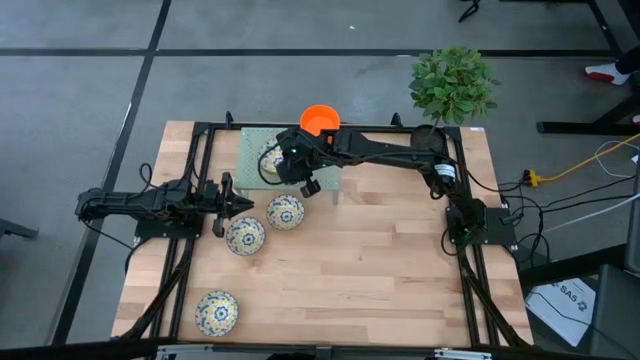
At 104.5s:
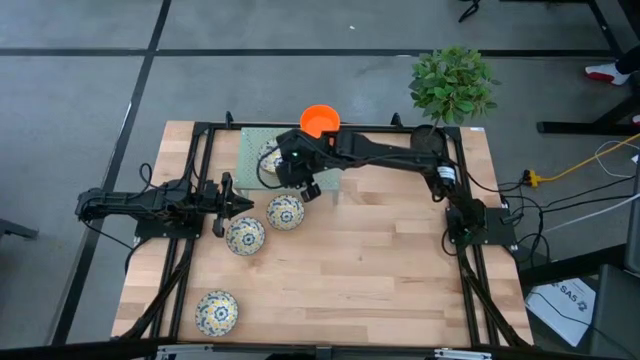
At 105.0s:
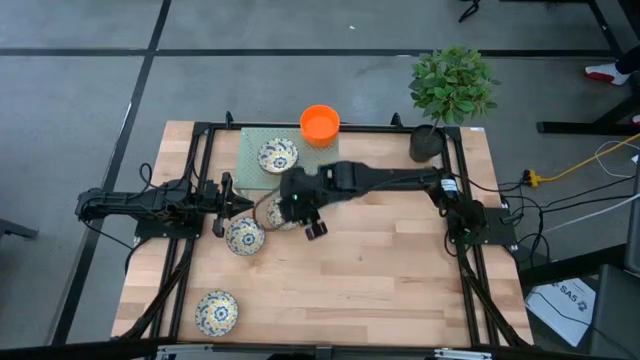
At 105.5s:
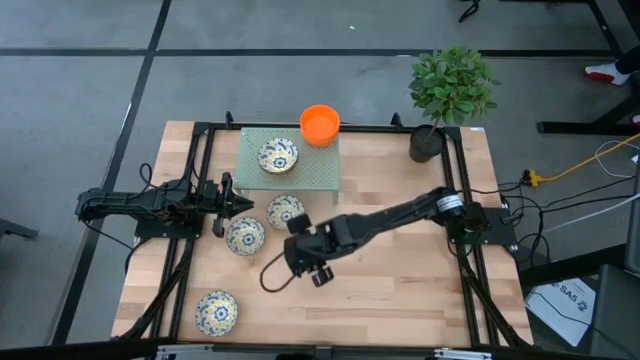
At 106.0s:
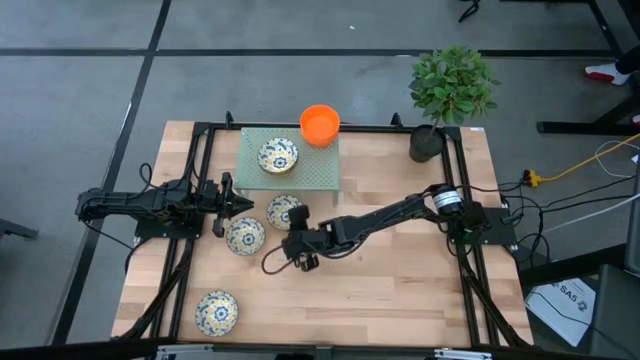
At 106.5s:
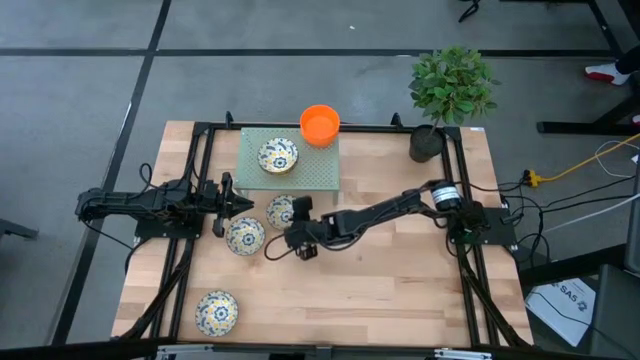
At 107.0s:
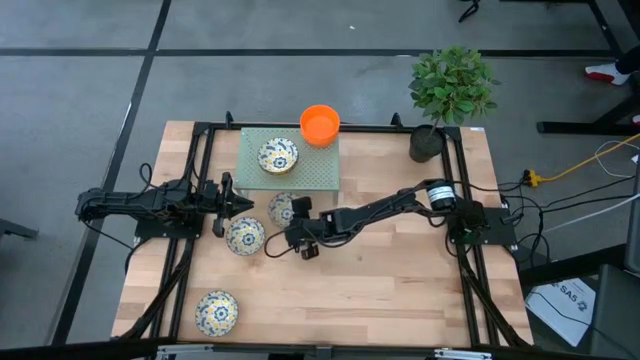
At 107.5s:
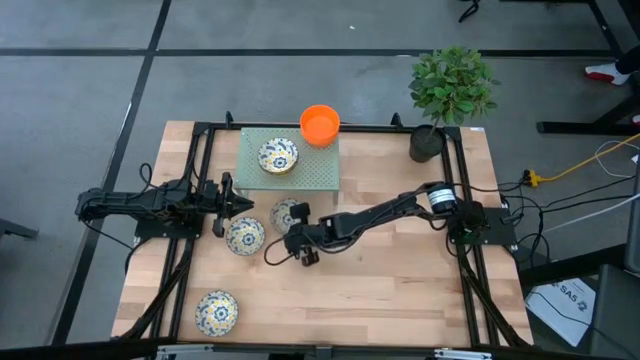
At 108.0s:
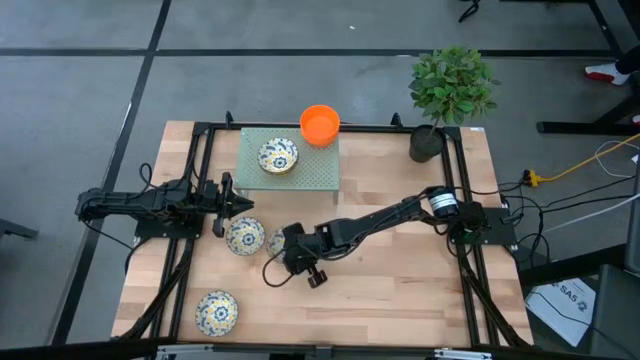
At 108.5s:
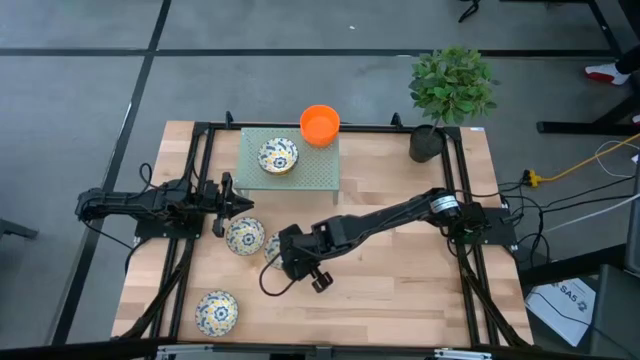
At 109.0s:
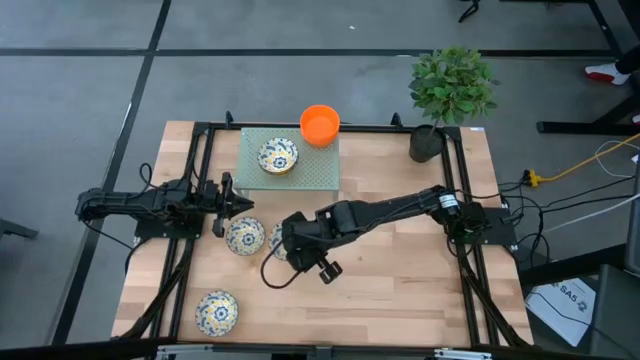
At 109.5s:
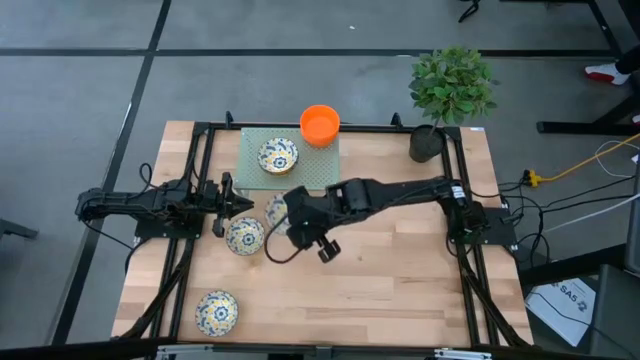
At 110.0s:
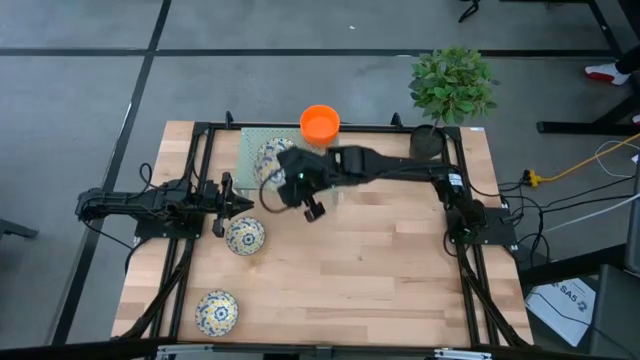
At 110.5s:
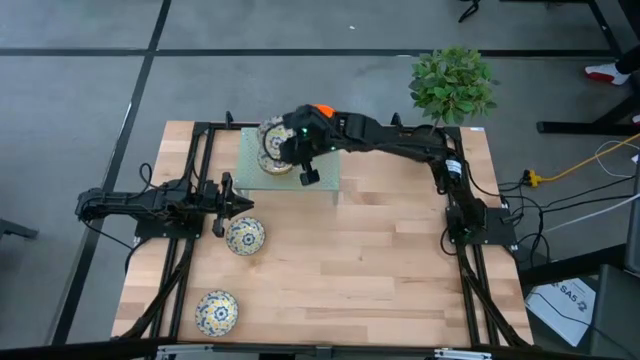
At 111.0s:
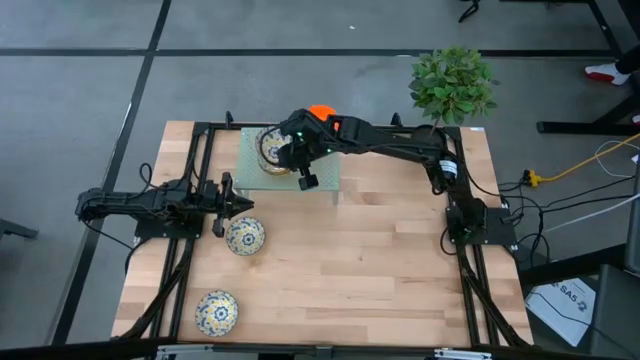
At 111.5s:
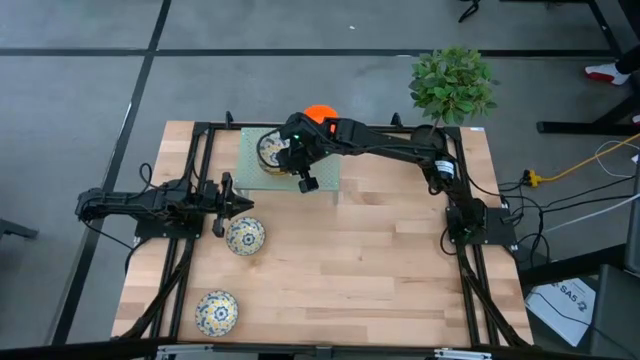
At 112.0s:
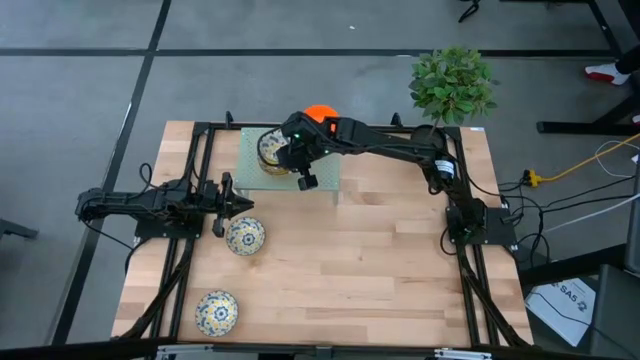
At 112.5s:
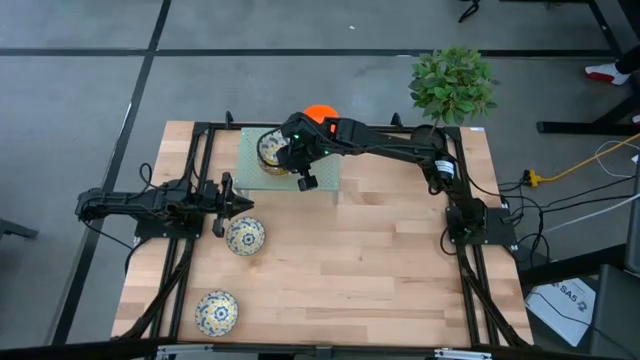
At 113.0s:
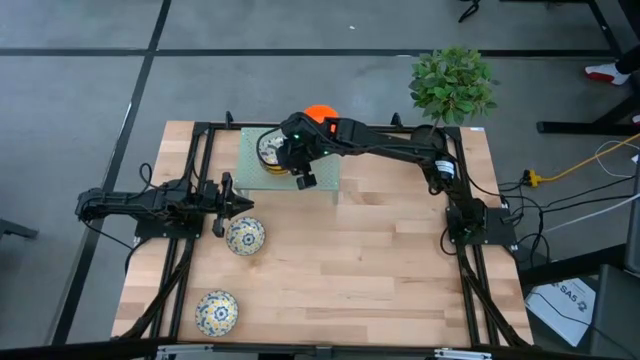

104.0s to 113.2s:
Task: Pick & Place Mini bowls
Stack the yellow bowl on top of the other yellow bowls on the shelf

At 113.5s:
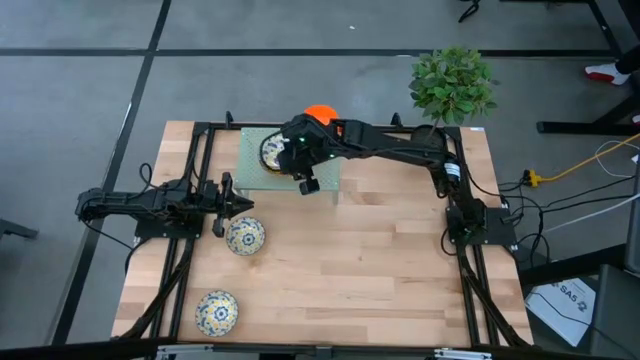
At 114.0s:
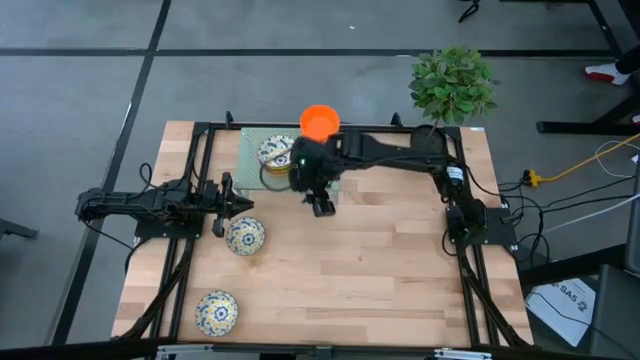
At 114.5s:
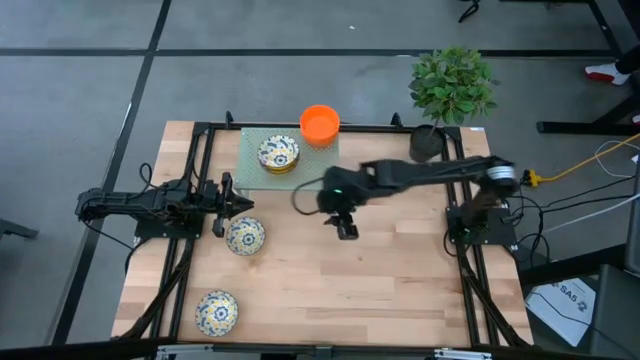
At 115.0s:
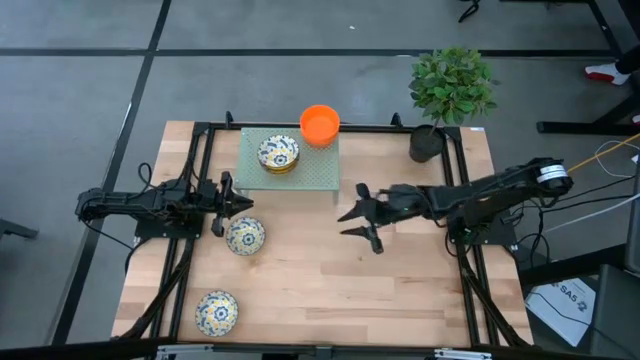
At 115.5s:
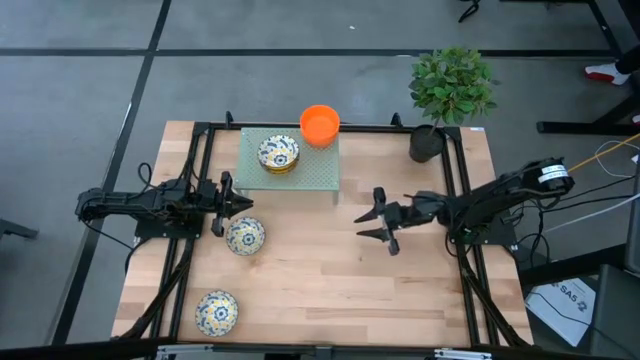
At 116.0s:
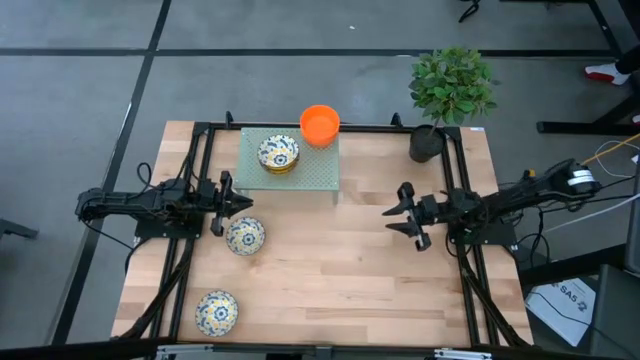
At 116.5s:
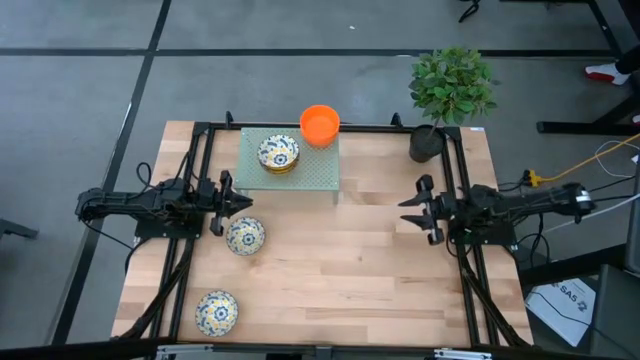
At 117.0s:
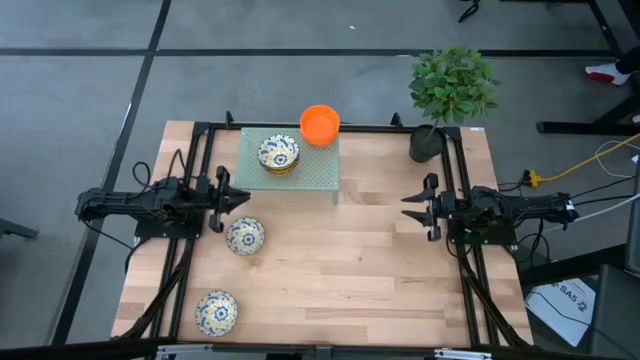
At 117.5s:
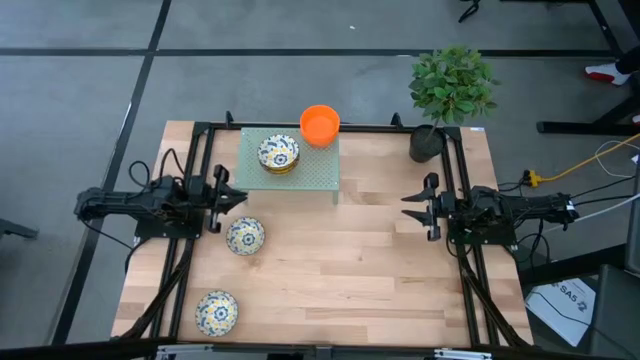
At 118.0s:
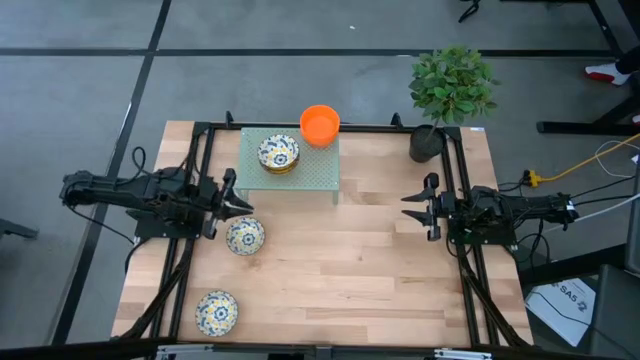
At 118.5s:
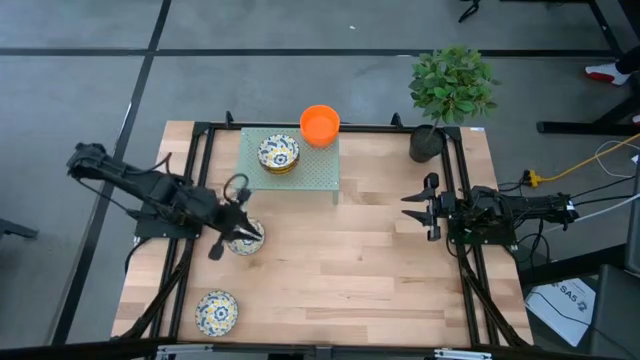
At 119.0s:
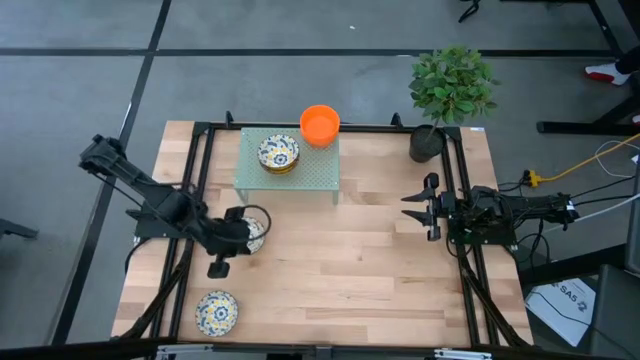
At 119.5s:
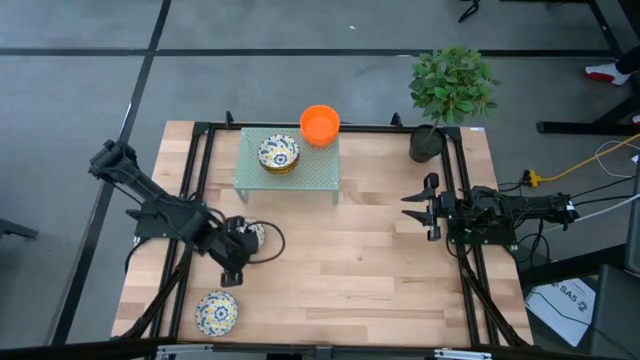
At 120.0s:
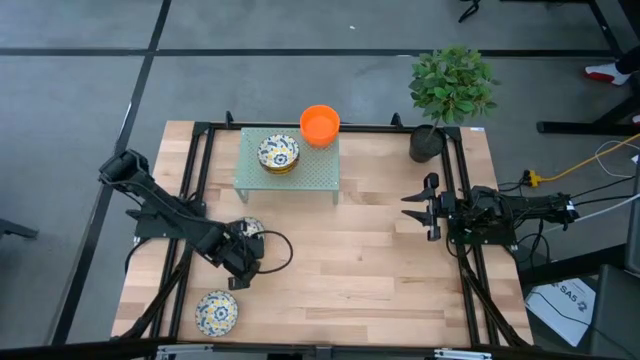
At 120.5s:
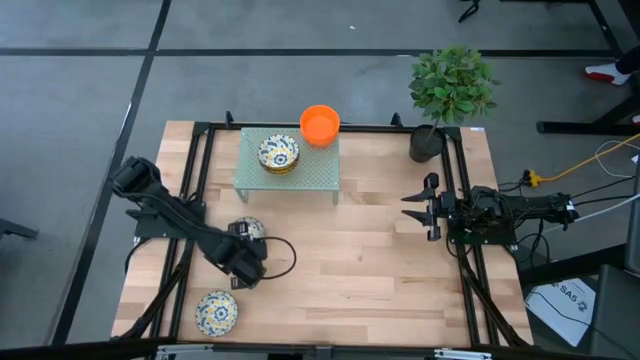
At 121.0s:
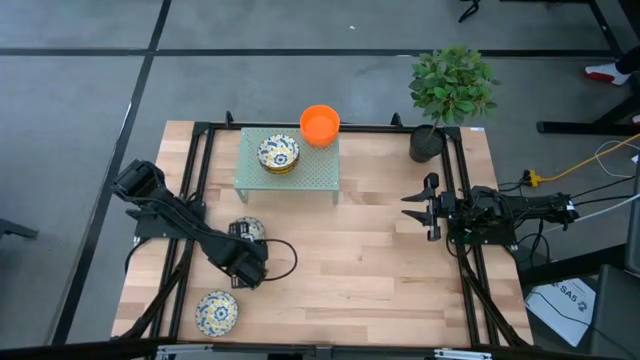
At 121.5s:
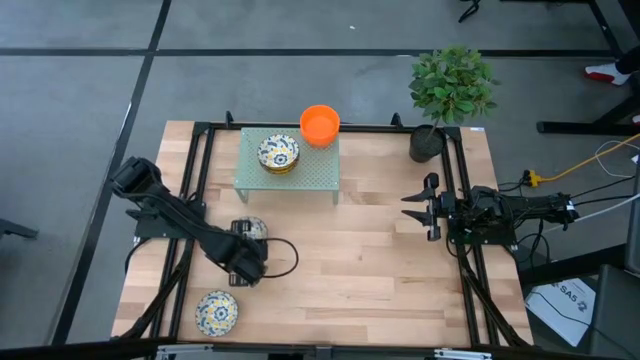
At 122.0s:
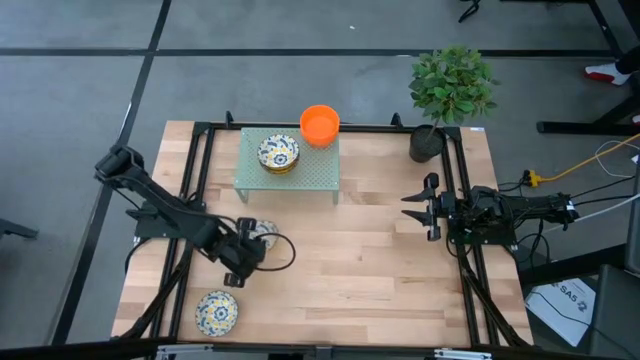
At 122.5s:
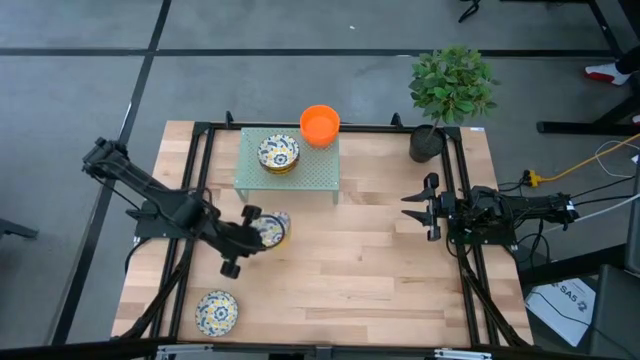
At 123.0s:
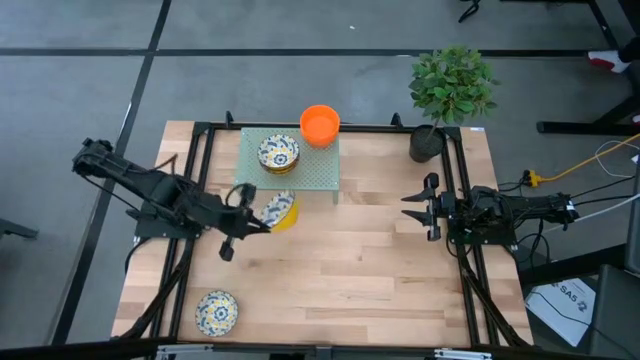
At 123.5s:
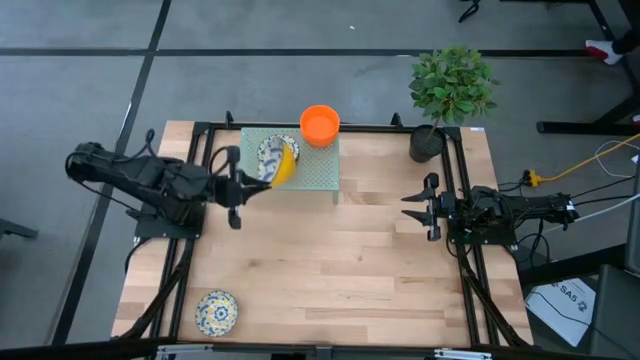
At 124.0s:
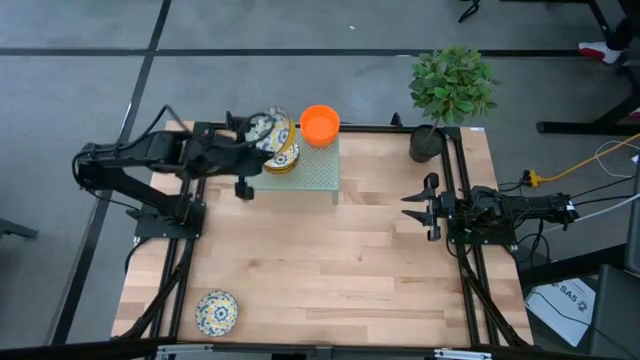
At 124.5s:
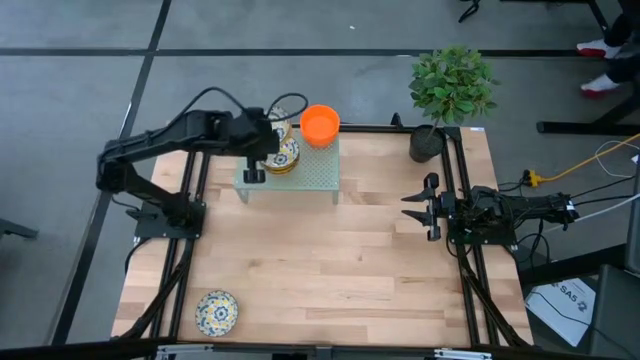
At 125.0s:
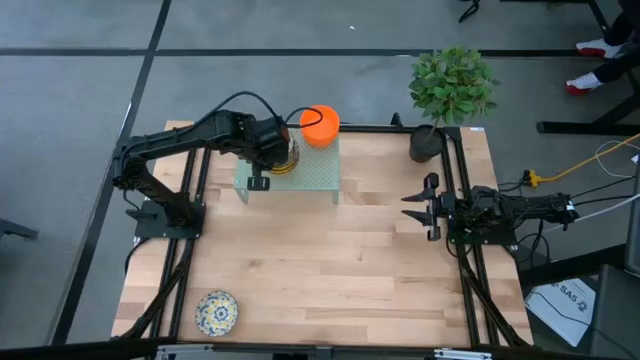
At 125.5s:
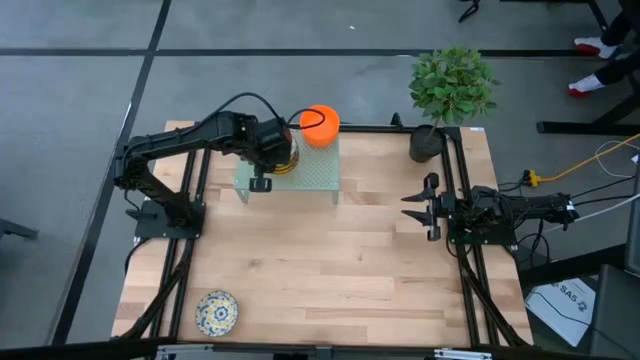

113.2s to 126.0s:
Stack the yellow bowl on top of the other yellow bowls on the shelf

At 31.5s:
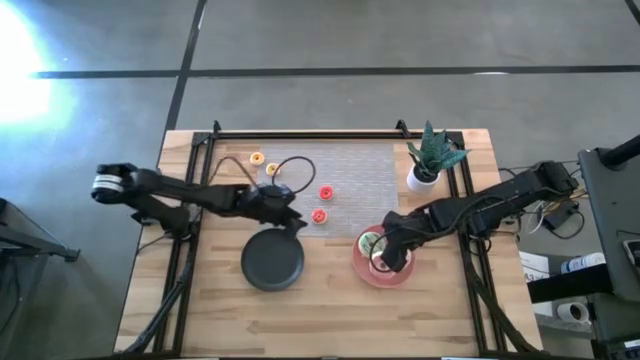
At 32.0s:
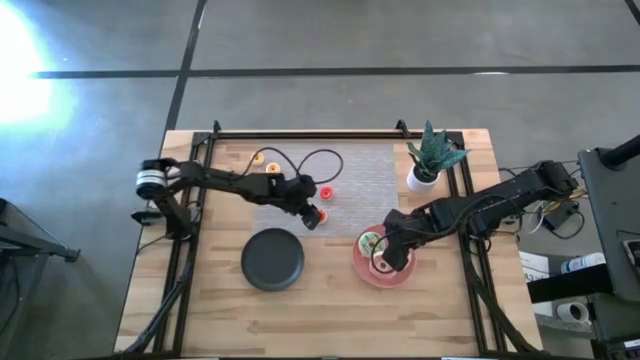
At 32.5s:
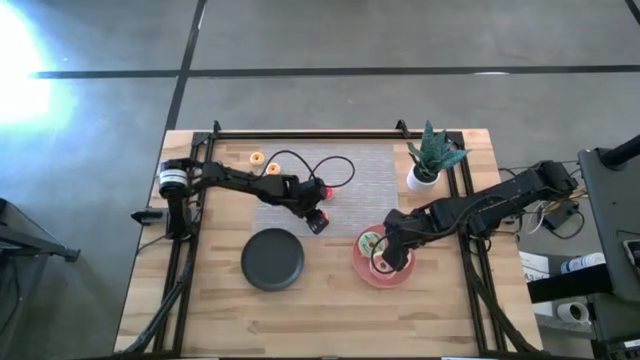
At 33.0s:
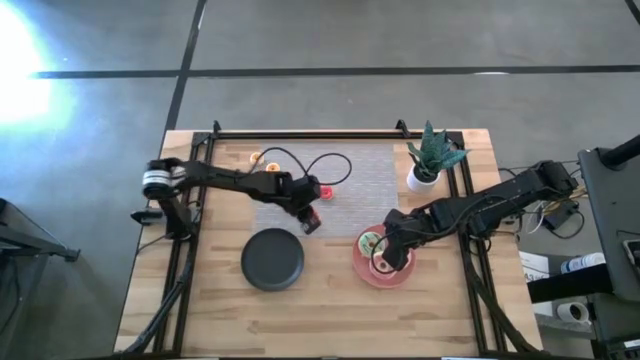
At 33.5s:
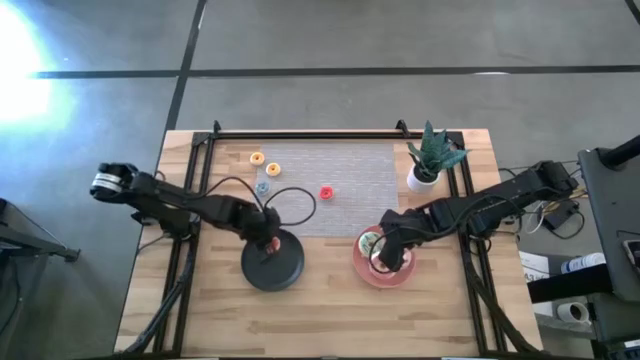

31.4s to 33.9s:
Task: Pick & Place donuts
Put the small orange donut on the black plate
